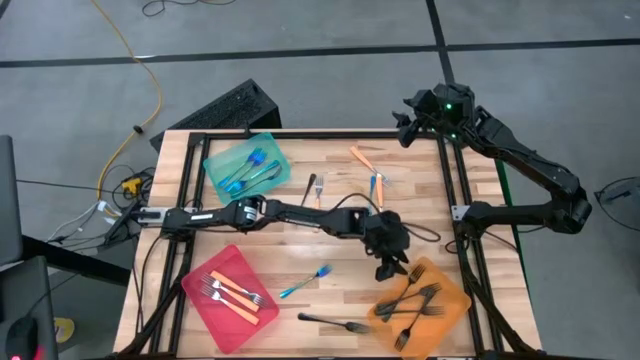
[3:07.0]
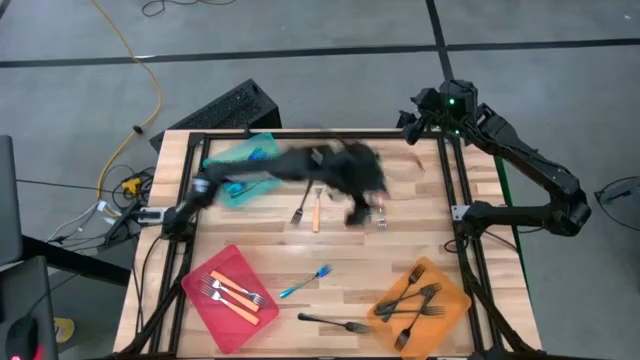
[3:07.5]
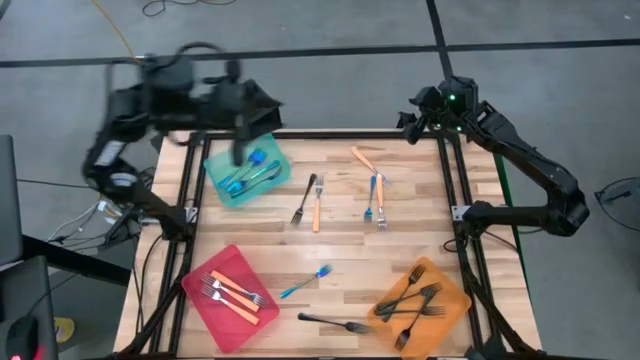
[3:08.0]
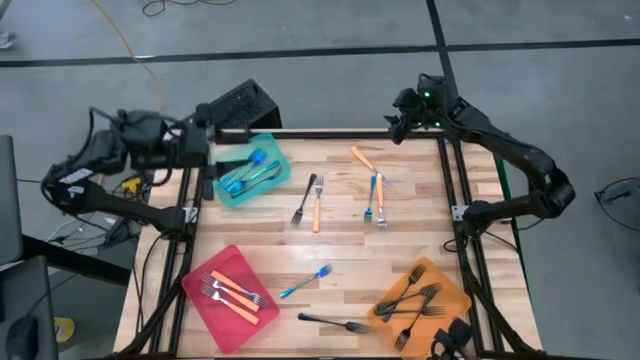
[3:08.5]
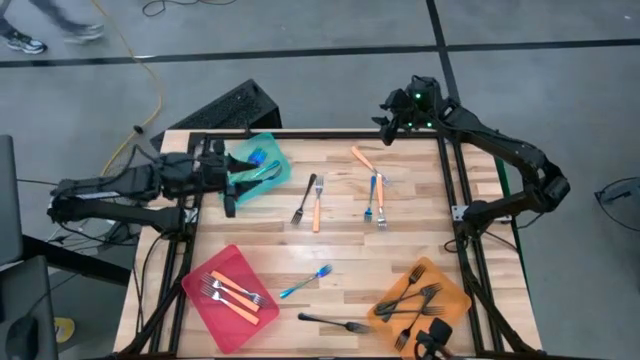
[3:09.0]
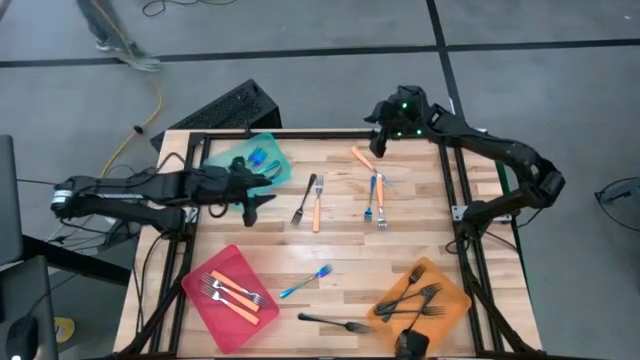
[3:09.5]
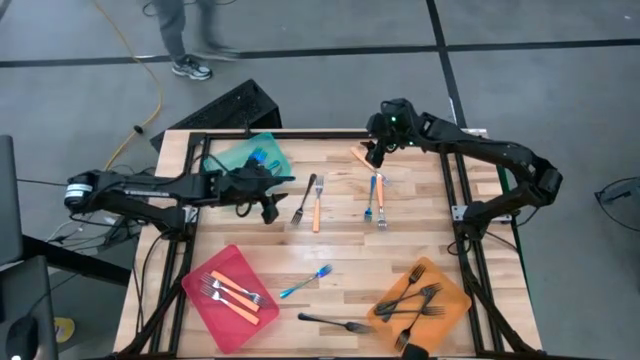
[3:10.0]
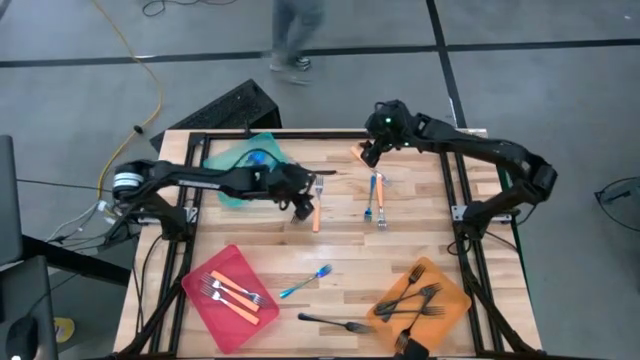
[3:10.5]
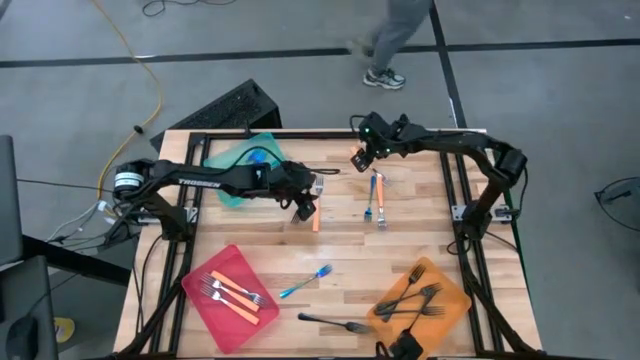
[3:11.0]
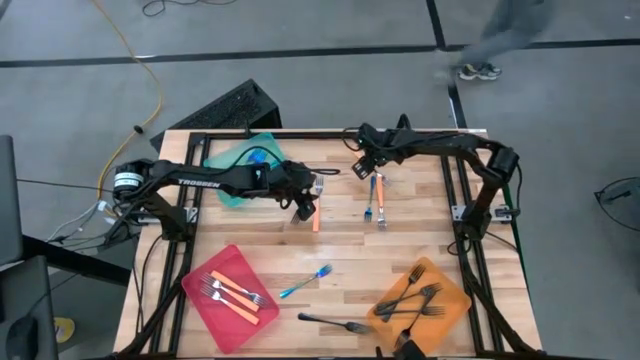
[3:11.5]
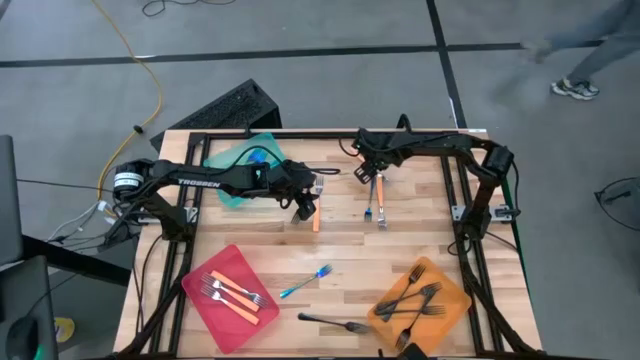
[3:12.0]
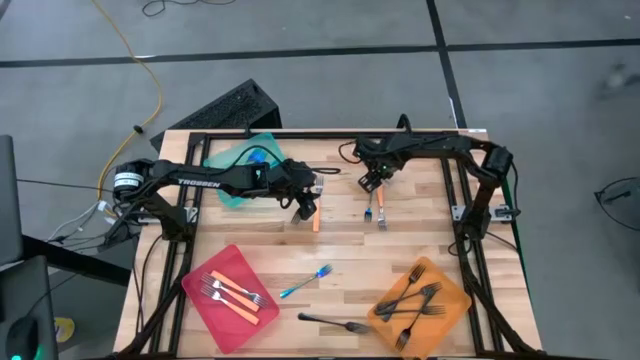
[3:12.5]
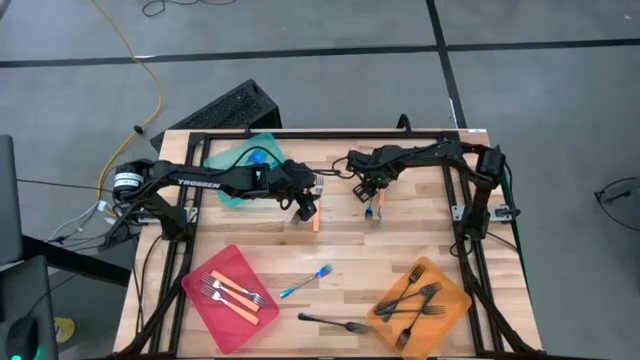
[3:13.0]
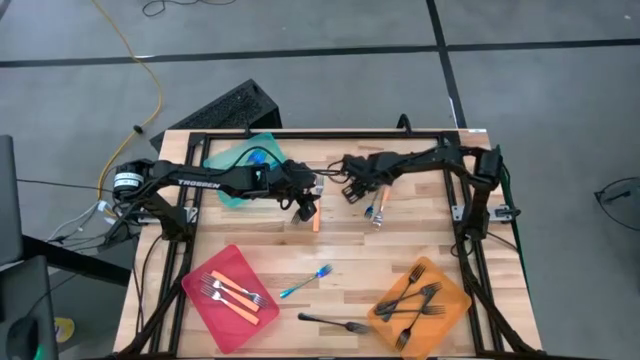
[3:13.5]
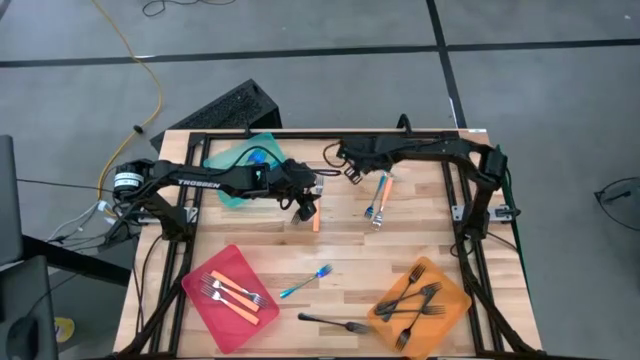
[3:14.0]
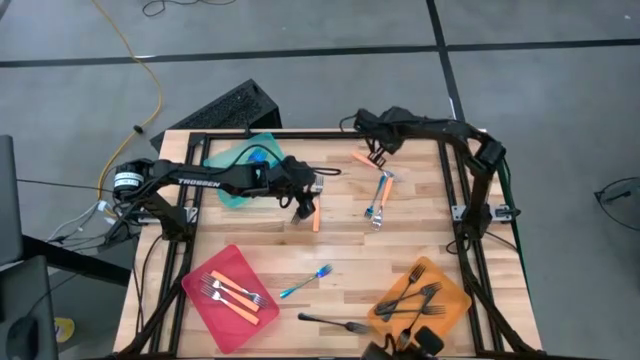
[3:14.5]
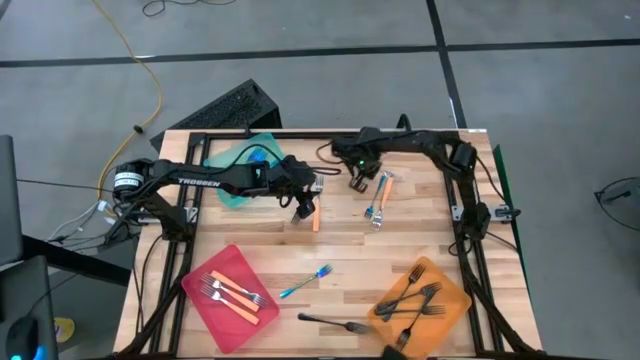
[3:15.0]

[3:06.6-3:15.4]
Task: Sort silverware by color (type)
Adjust the forks on the table

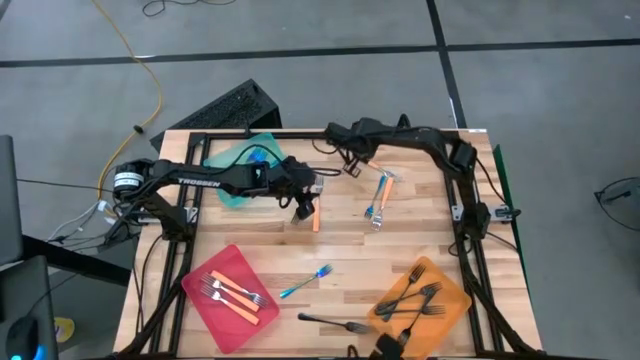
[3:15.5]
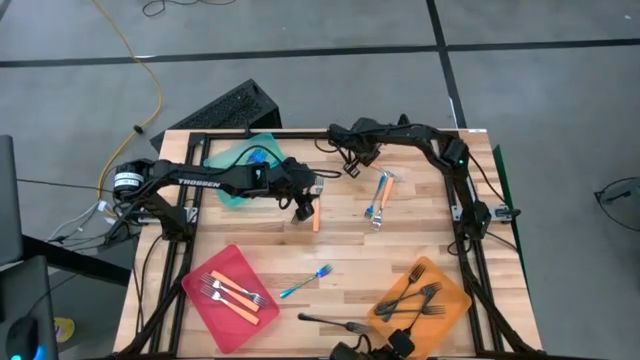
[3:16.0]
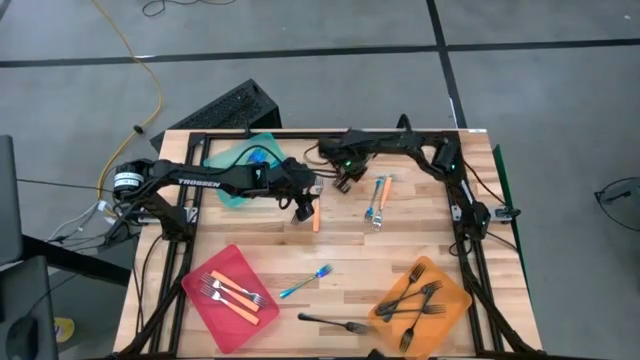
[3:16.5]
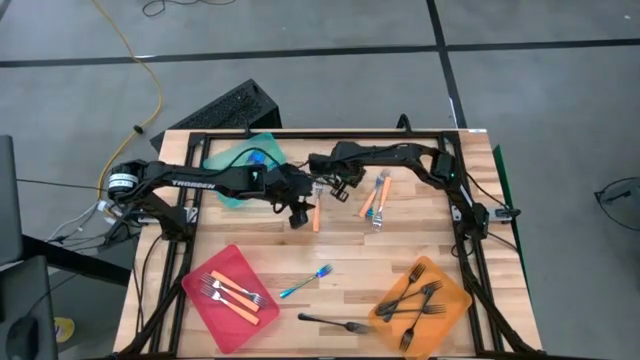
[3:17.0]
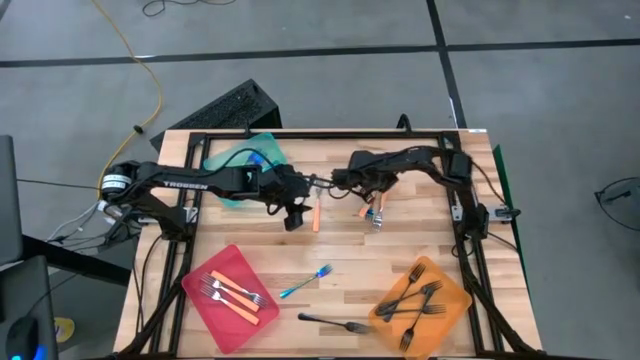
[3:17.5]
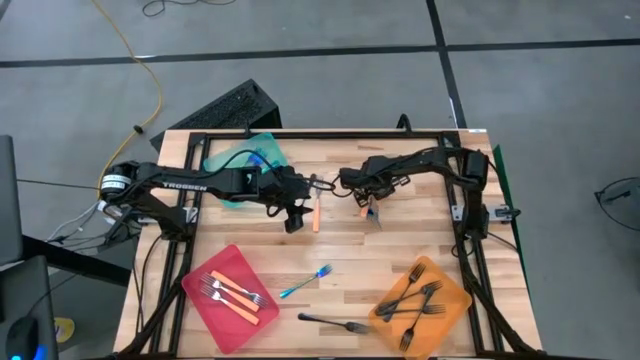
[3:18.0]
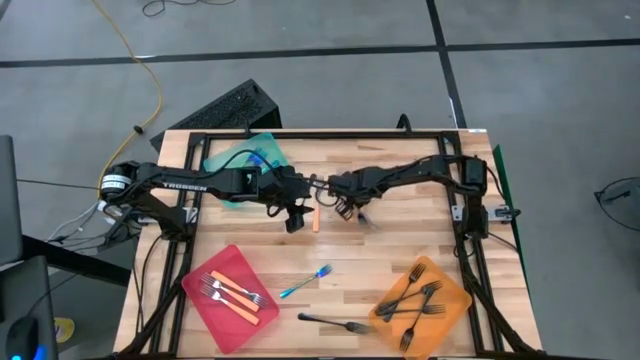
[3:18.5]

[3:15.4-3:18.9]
Adjust the forks on the table

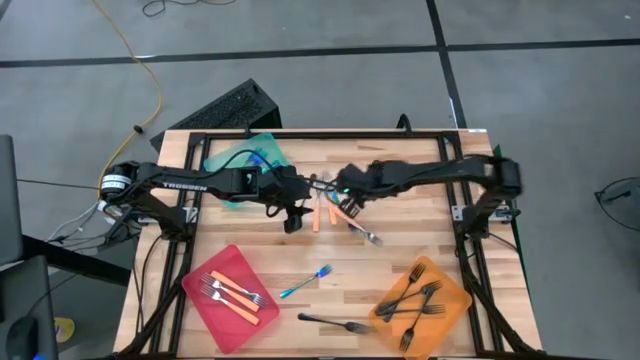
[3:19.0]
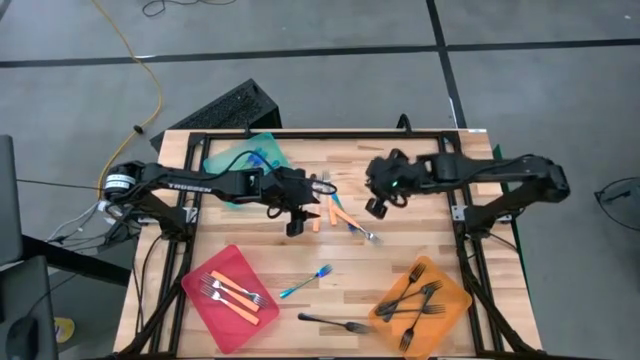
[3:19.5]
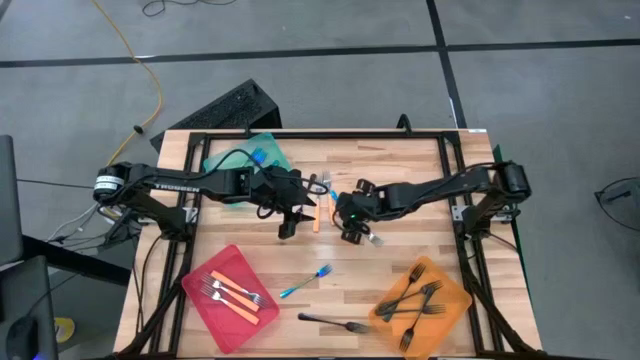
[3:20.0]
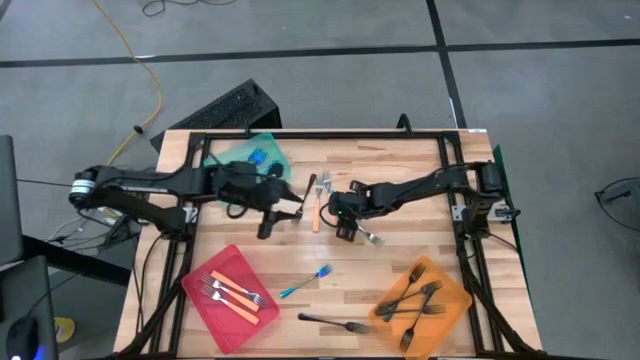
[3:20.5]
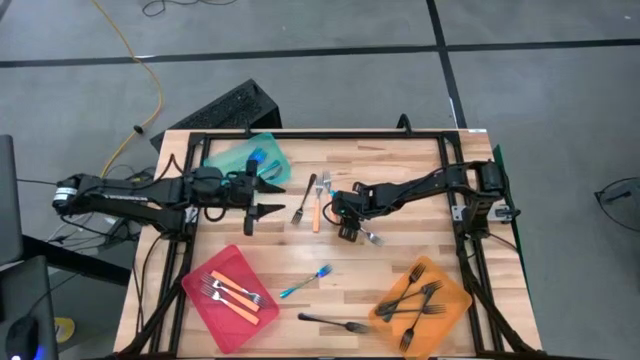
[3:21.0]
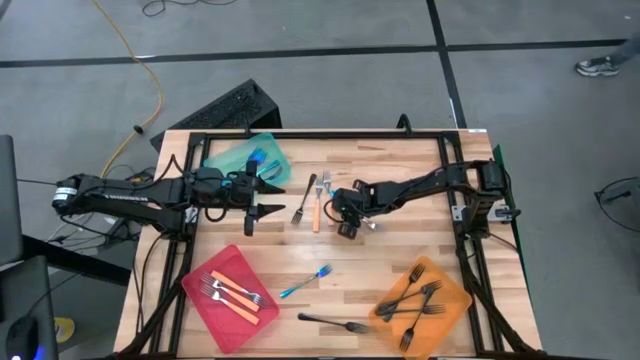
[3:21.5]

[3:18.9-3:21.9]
Put the orange fork into the red bin

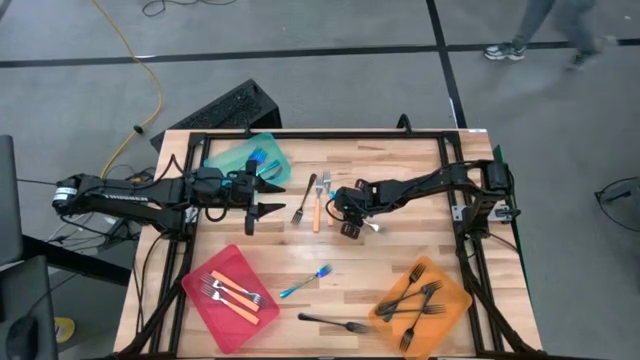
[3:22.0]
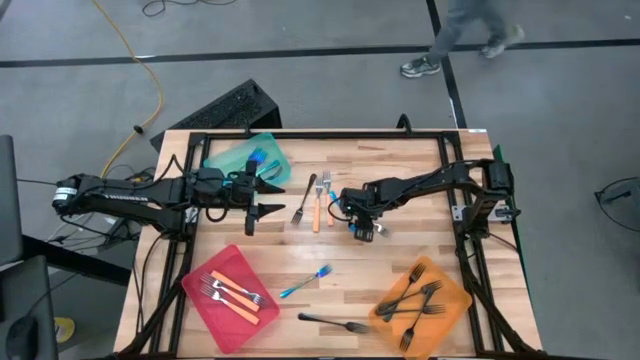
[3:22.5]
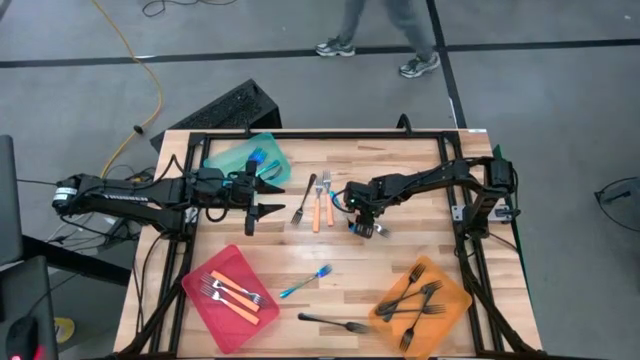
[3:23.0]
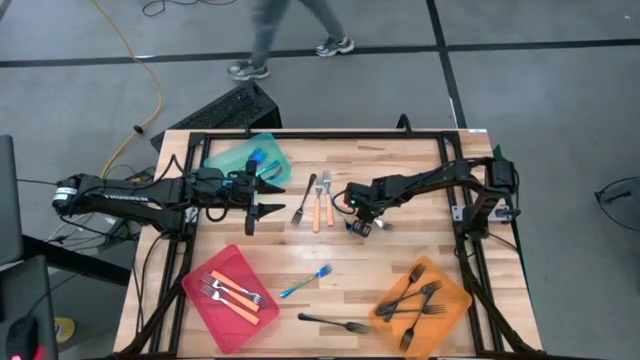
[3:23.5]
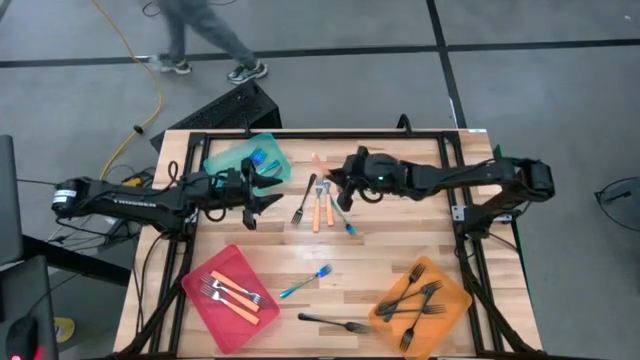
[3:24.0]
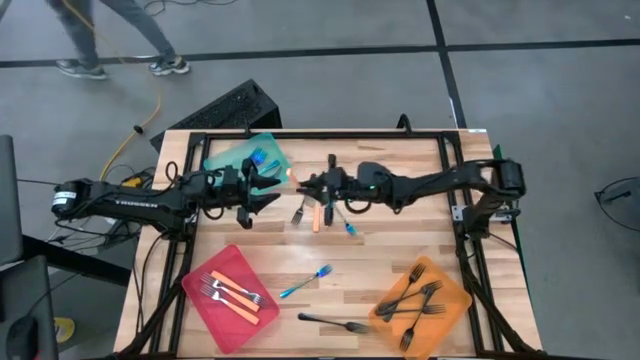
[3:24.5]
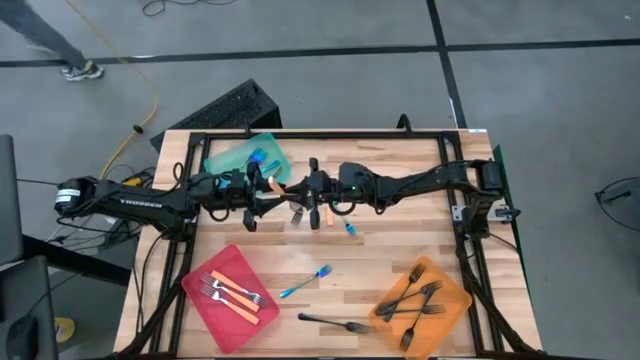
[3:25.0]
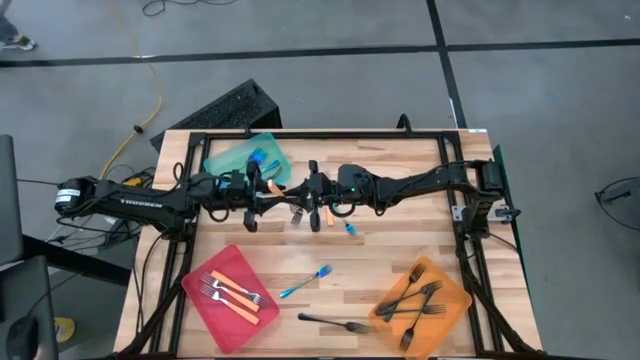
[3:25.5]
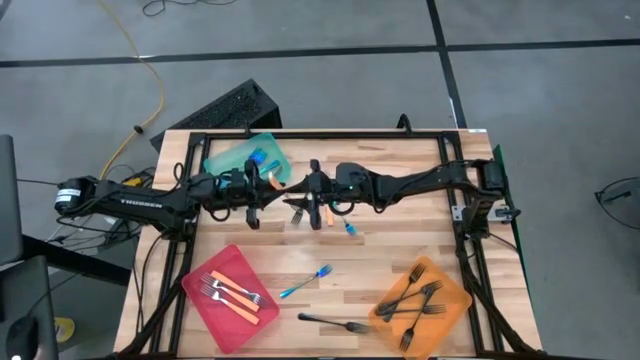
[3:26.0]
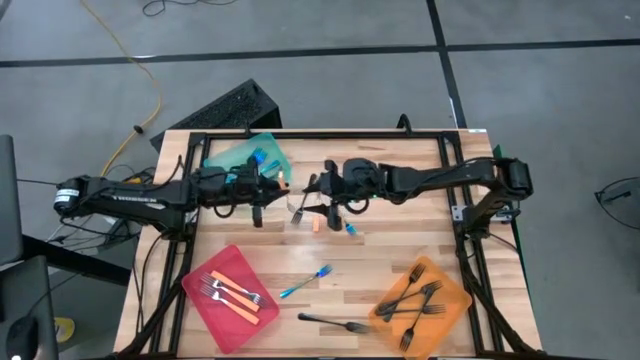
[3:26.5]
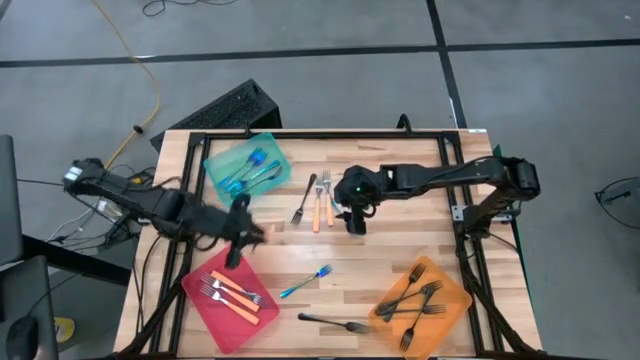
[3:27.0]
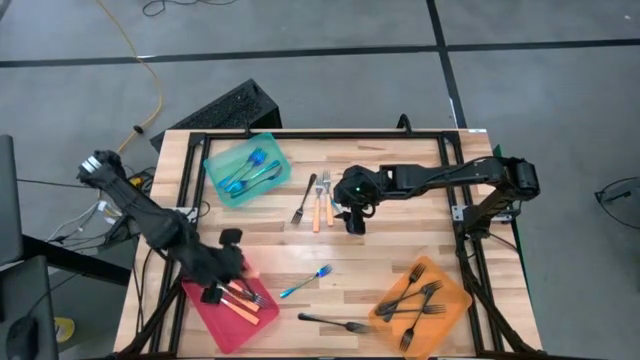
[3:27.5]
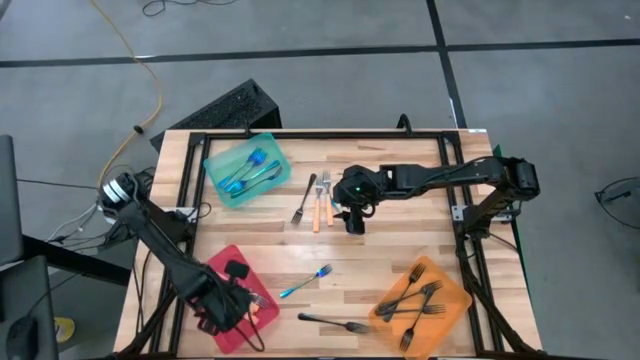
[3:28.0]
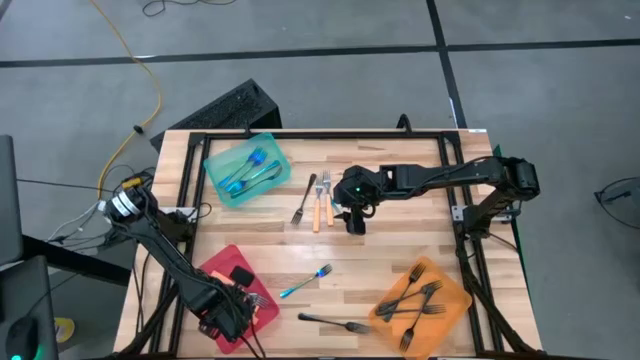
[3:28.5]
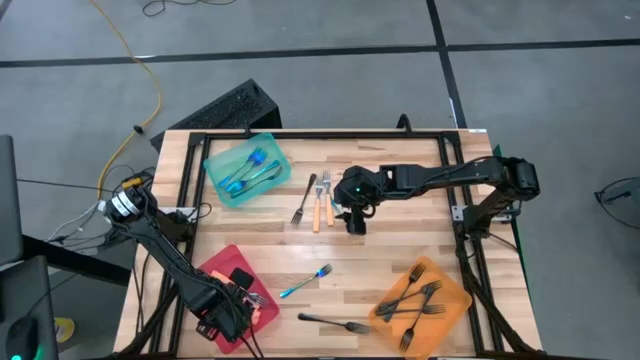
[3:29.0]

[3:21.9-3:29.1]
Put the orange fork into the red bin
